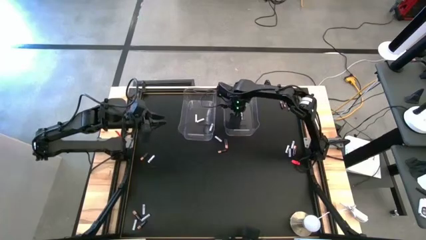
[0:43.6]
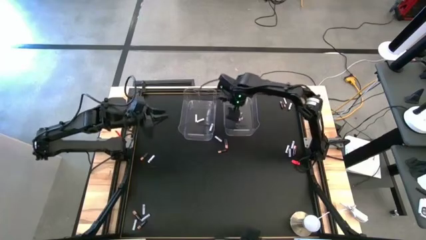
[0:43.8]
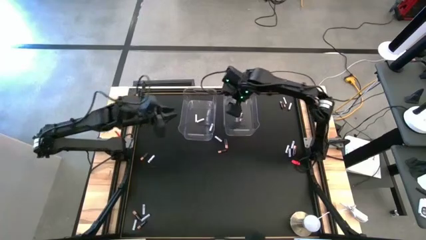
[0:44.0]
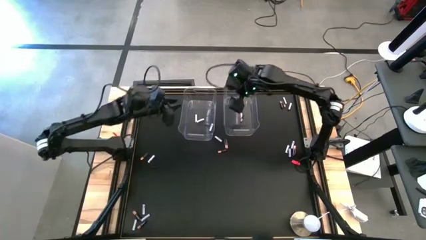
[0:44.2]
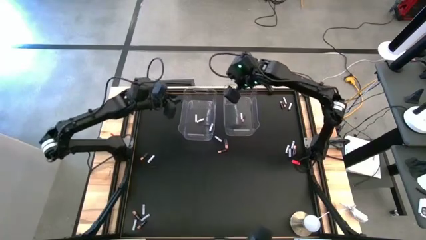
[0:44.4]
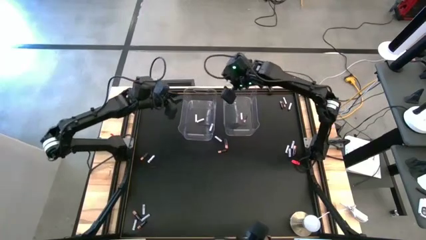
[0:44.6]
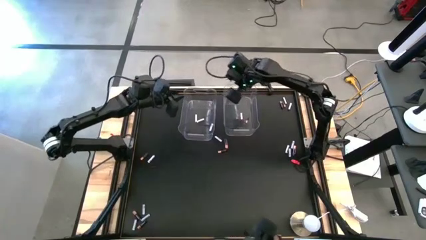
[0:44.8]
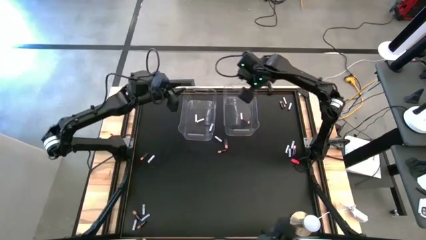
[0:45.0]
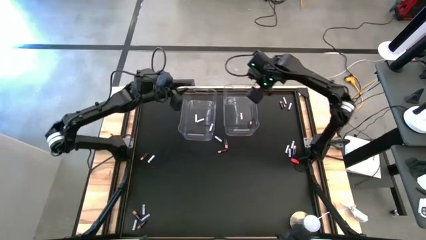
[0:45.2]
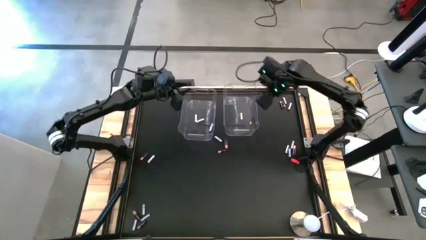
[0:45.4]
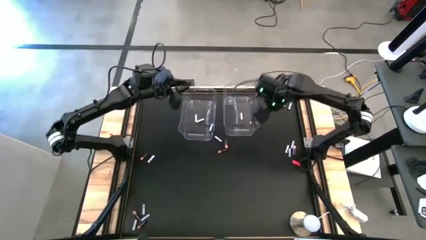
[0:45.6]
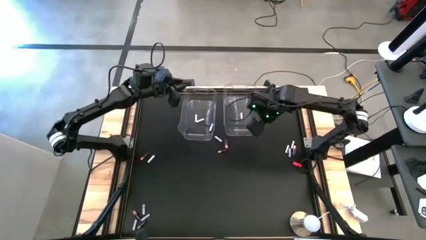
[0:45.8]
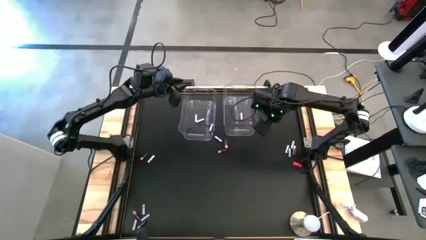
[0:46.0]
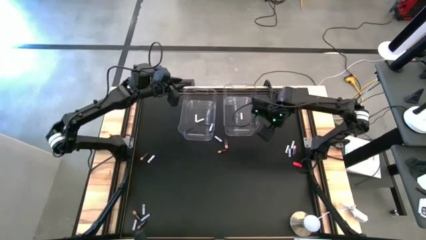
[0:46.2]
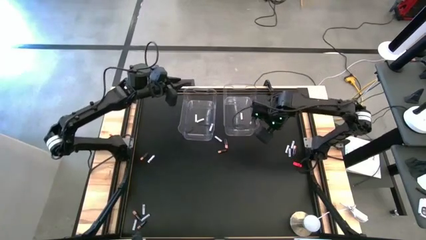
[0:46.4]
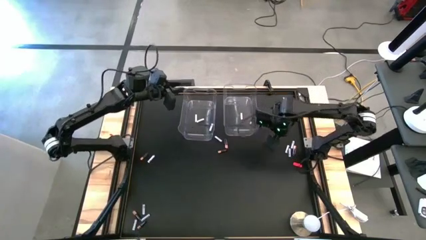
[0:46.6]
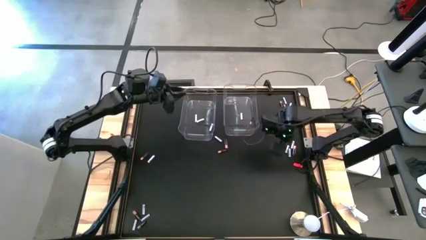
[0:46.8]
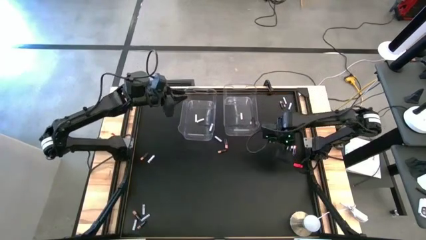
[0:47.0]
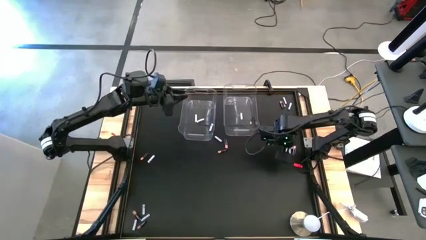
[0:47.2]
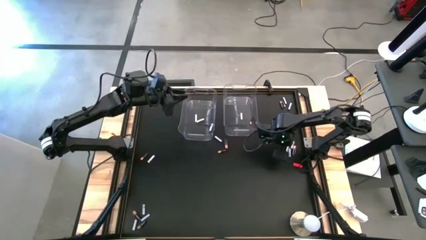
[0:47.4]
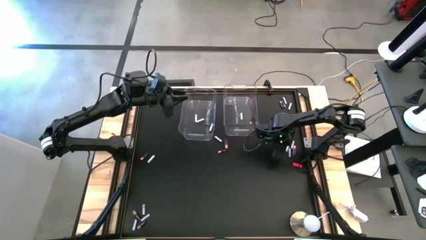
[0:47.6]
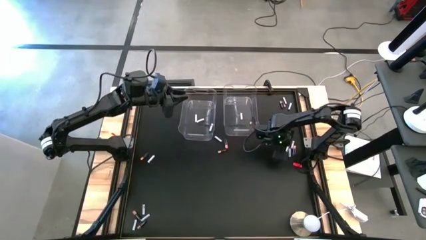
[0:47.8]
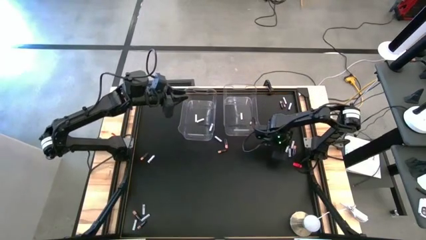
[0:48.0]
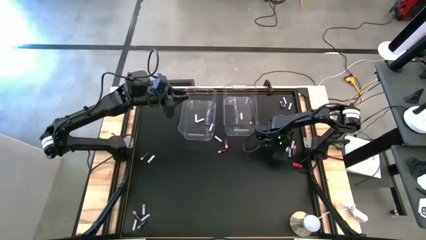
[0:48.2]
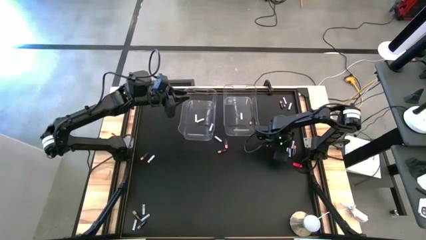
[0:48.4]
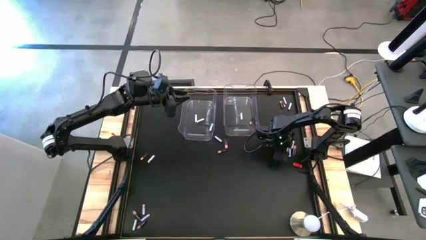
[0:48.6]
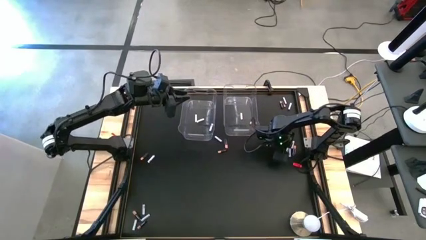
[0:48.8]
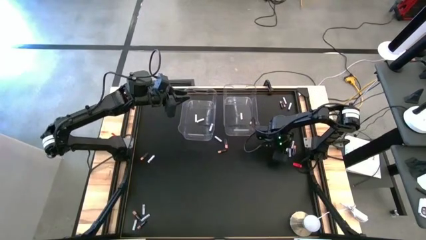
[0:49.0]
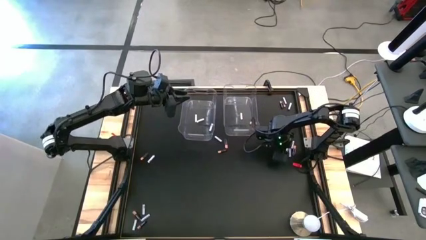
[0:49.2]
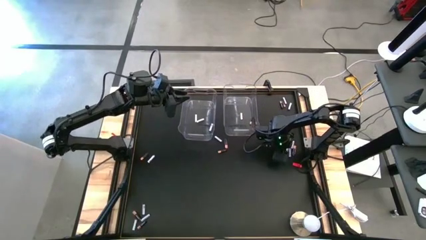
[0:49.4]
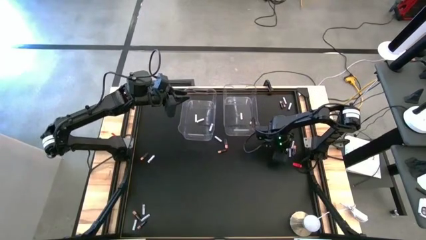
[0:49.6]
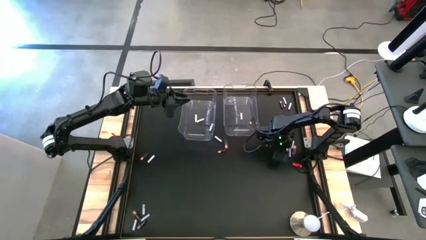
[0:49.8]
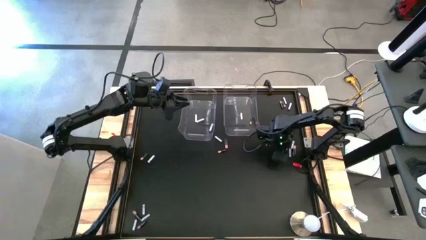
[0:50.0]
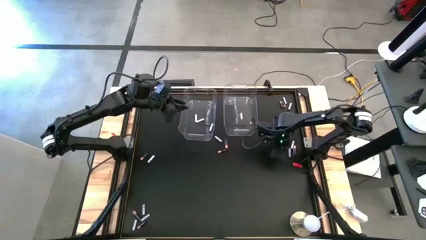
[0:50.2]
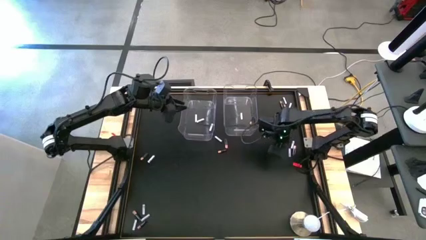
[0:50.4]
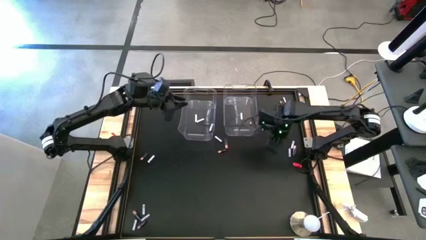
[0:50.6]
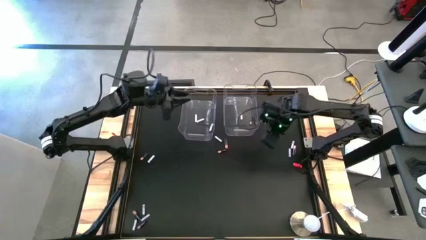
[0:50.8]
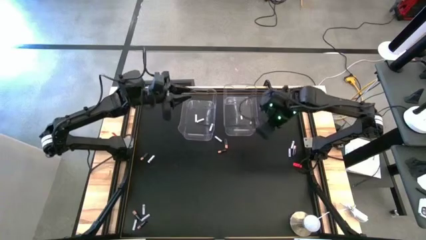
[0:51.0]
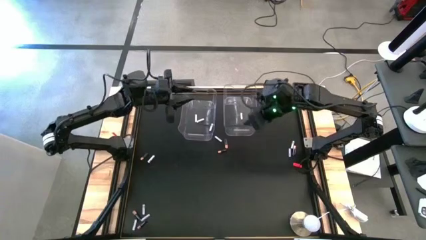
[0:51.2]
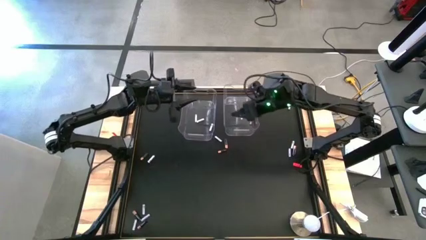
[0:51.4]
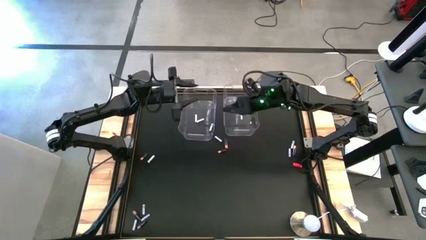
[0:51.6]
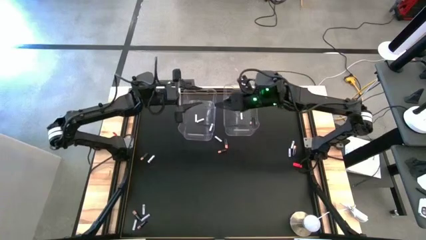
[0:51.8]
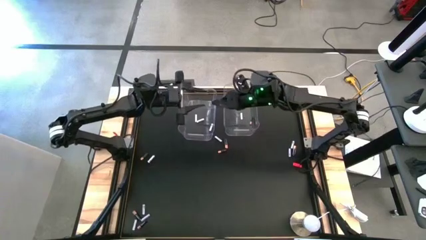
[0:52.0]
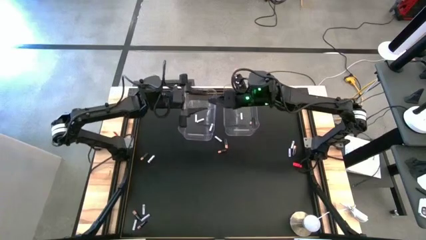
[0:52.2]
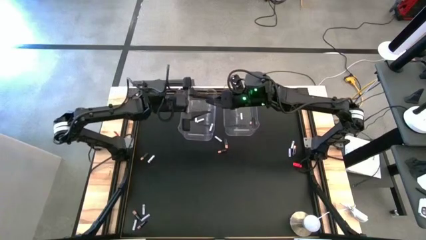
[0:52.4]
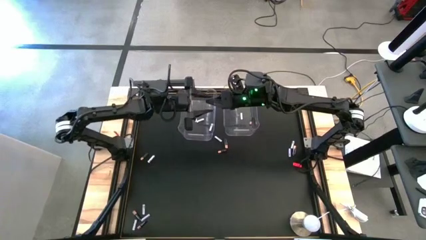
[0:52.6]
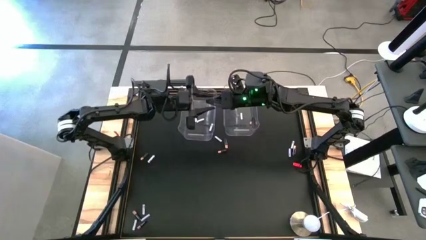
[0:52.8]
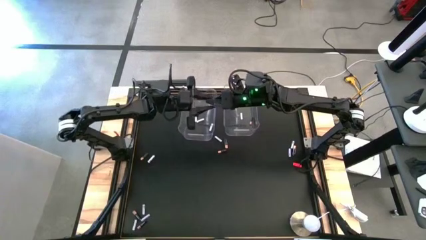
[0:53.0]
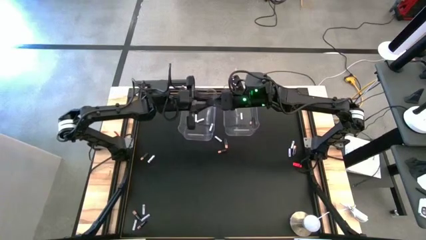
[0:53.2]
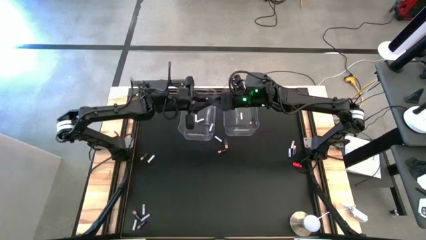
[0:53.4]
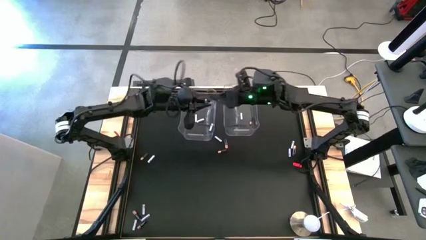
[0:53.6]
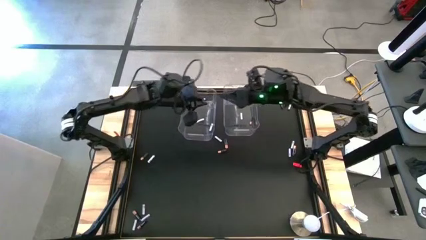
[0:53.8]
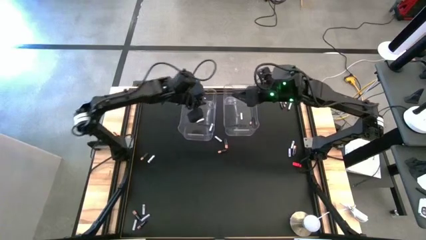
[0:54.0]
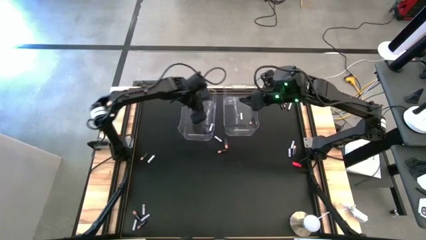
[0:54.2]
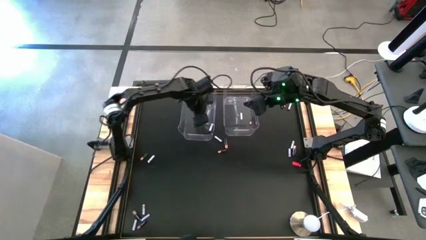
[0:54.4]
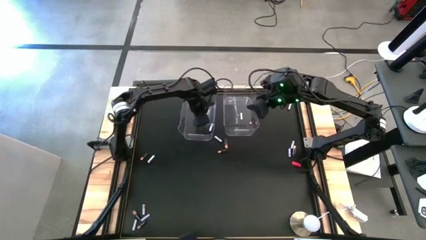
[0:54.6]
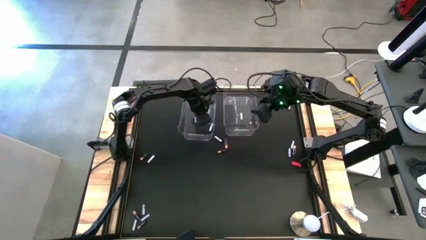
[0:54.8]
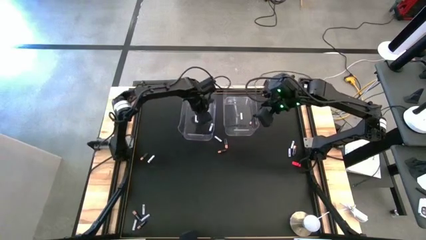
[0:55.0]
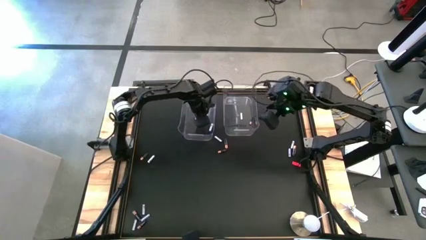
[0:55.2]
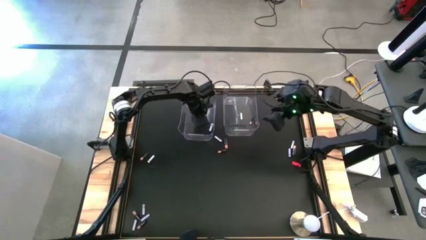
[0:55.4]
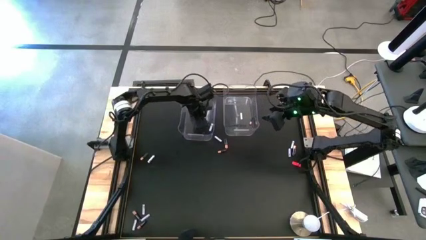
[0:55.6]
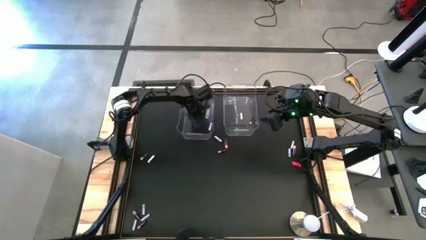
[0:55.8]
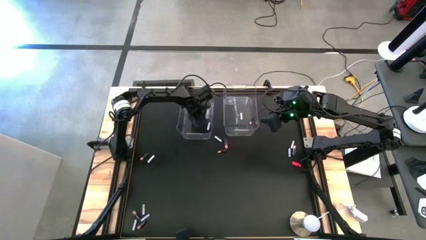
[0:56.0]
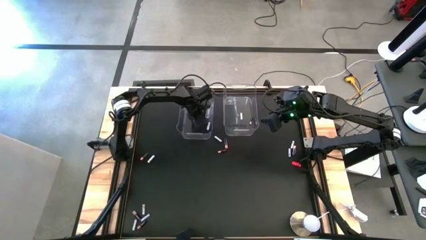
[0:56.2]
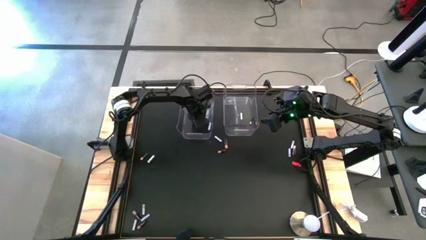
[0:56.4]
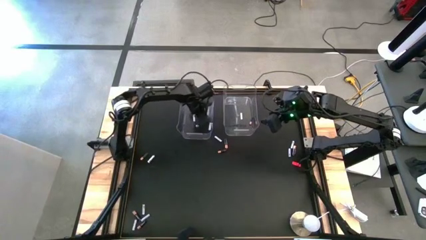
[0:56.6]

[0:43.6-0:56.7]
Task: Sort batteries
Put the white battery into the left transparent bin

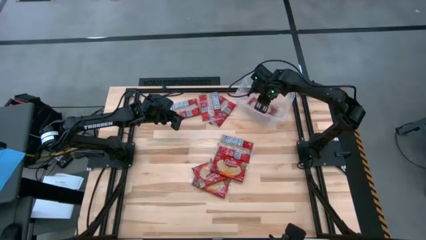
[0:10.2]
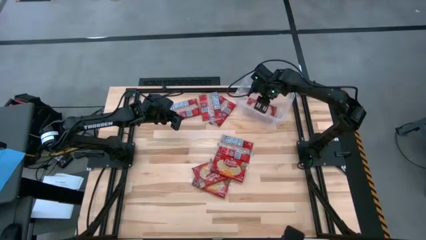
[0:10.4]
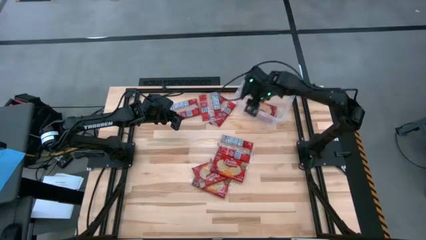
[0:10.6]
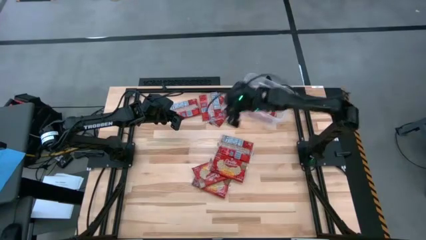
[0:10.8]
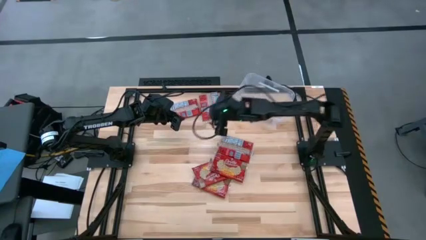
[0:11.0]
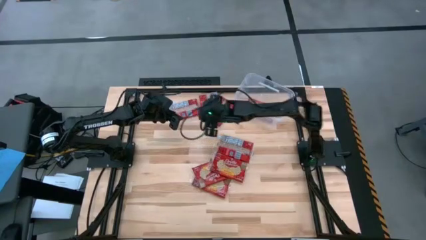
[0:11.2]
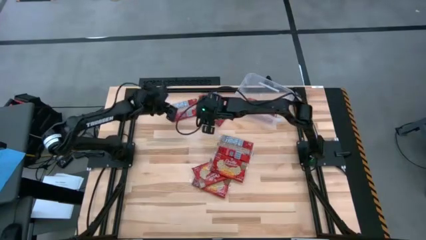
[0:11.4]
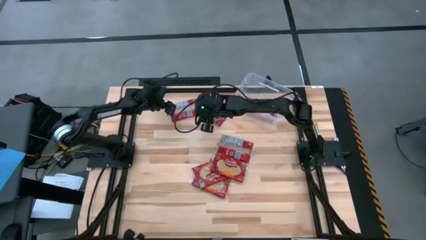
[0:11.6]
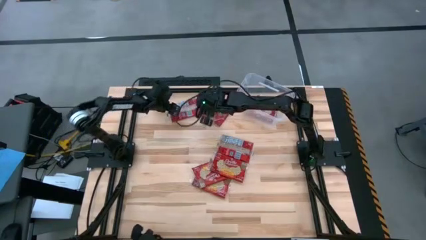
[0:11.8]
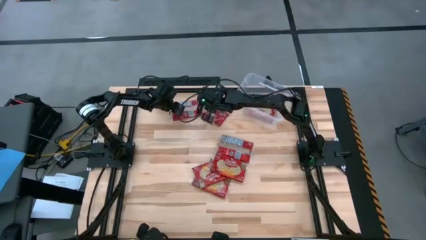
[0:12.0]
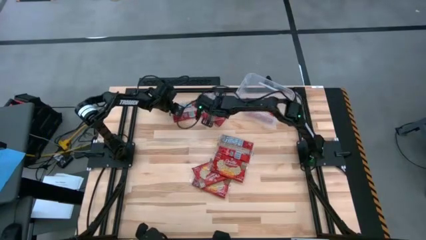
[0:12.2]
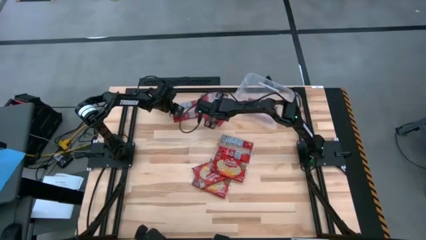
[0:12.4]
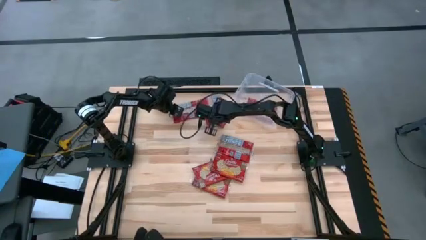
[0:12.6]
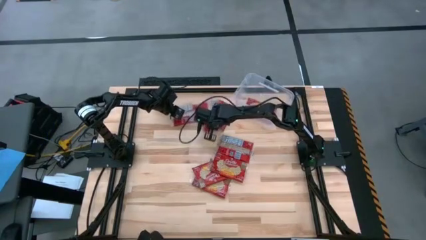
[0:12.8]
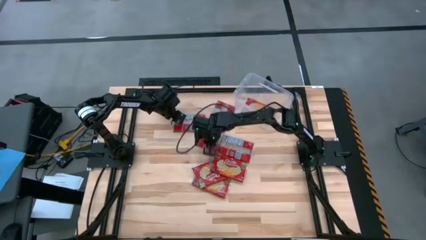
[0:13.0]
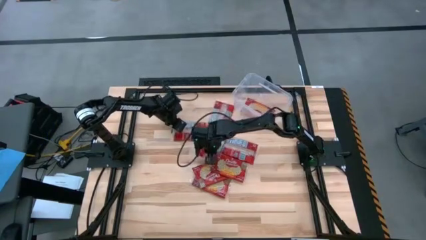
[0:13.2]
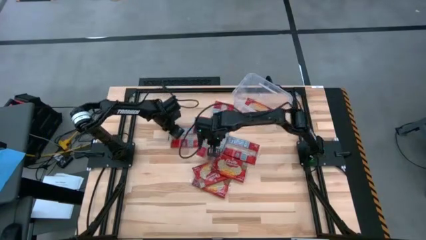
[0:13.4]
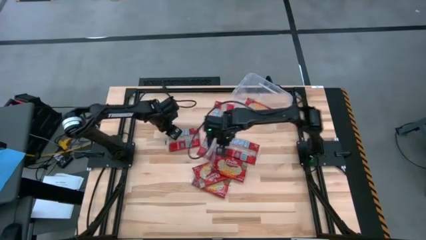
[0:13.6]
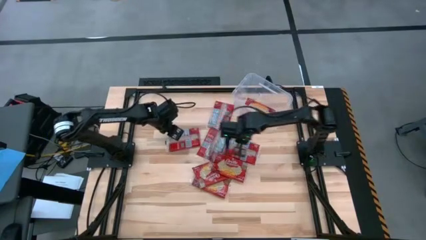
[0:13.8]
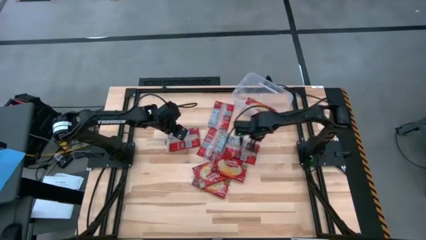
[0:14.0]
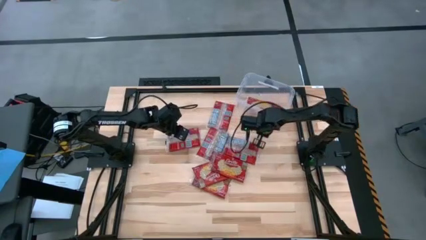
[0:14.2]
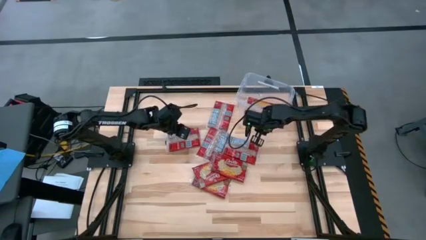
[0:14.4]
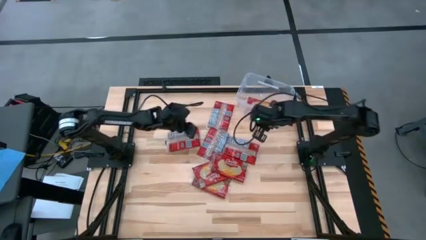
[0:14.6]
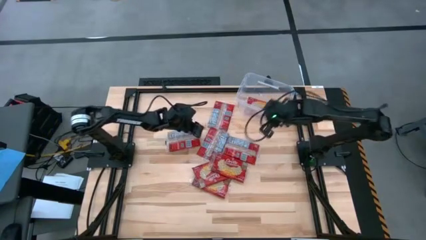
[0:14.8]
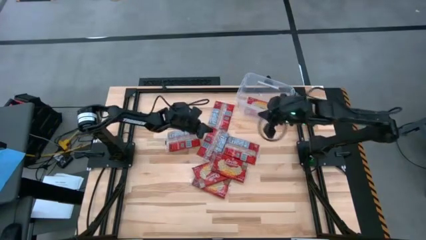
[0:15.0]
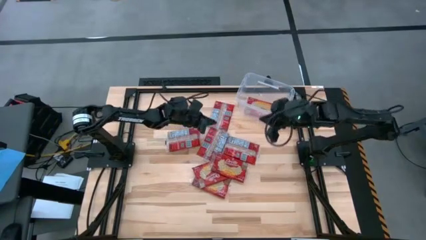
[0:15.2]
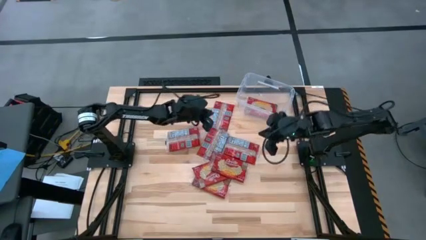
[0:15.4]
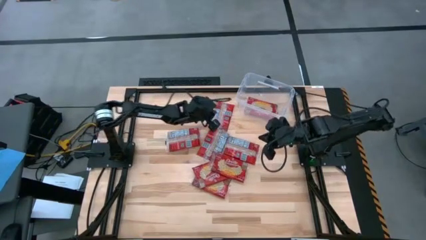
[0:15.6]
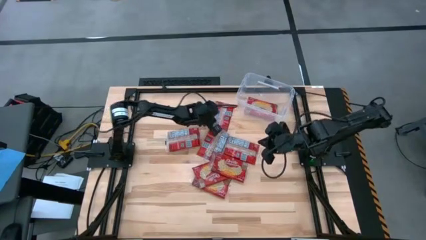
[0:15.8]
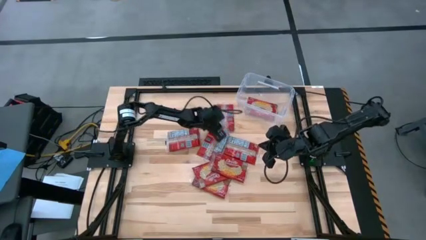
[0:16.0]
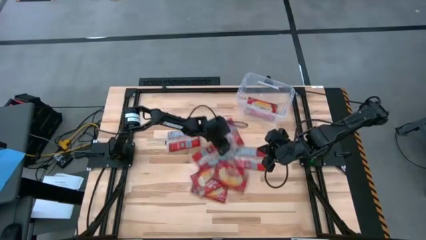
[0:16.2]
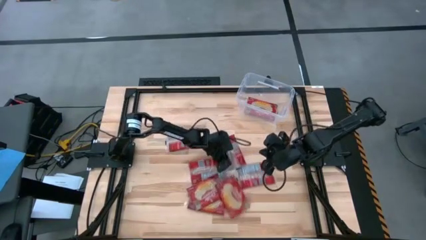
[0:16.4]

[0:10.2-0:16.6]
Task: Sort popcorn bags into baskets
Move the red popcorns to the center of the table
